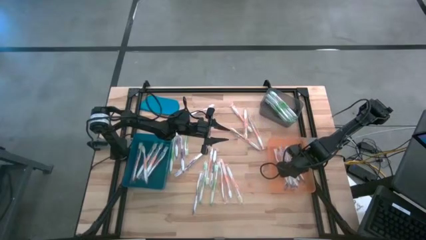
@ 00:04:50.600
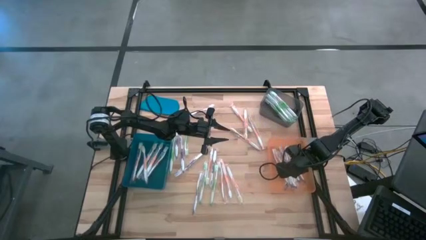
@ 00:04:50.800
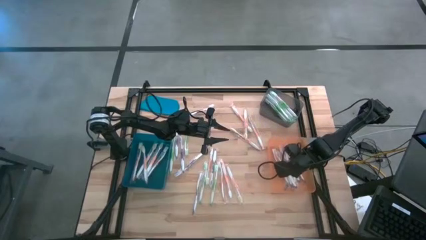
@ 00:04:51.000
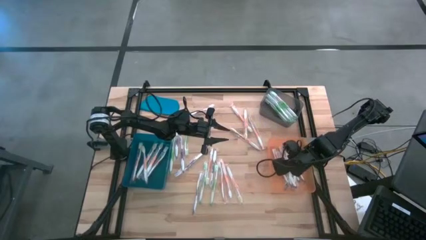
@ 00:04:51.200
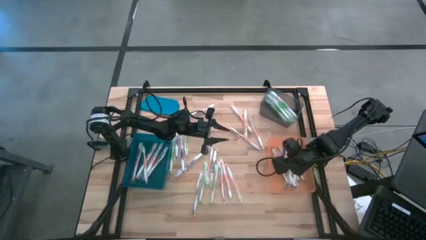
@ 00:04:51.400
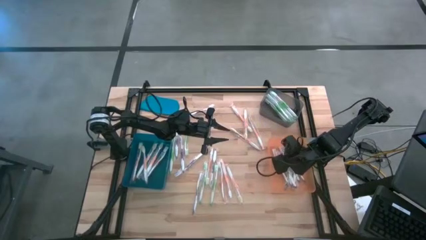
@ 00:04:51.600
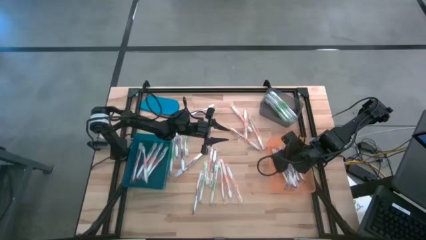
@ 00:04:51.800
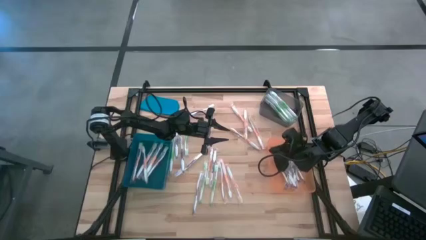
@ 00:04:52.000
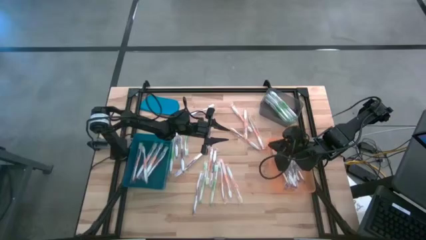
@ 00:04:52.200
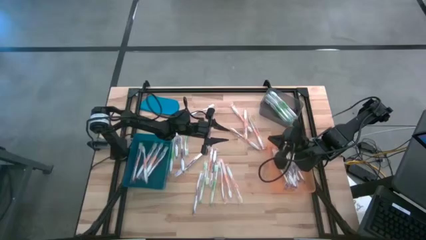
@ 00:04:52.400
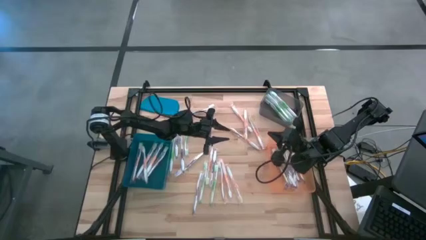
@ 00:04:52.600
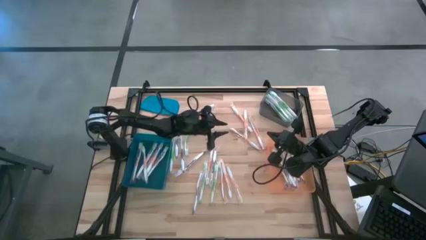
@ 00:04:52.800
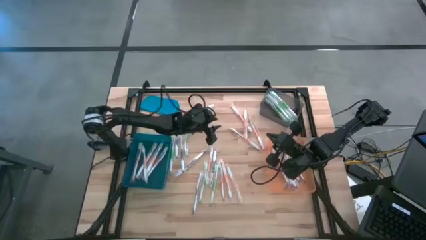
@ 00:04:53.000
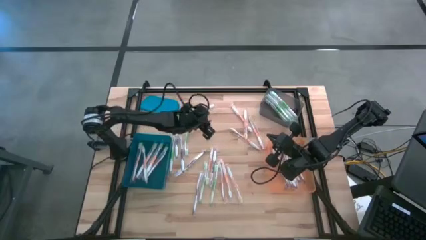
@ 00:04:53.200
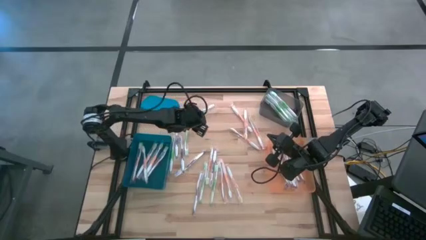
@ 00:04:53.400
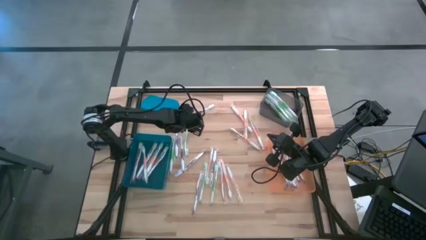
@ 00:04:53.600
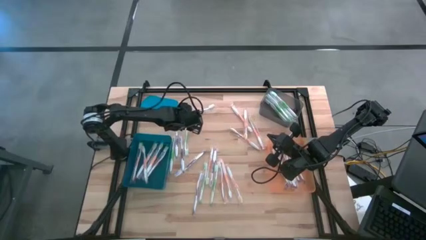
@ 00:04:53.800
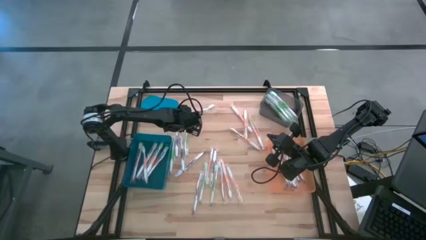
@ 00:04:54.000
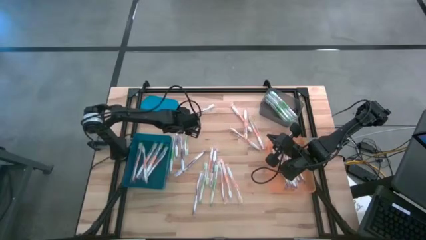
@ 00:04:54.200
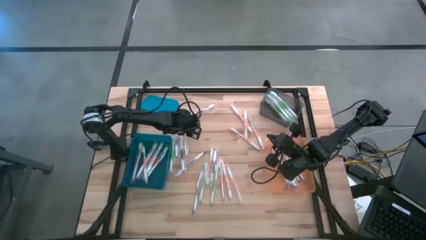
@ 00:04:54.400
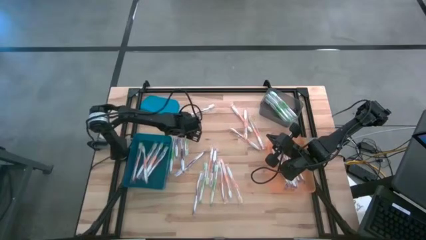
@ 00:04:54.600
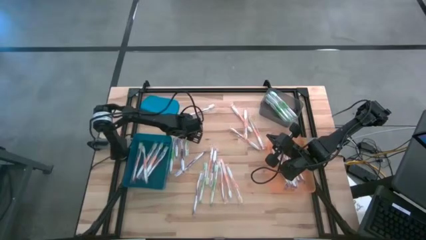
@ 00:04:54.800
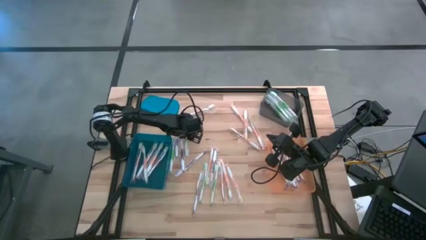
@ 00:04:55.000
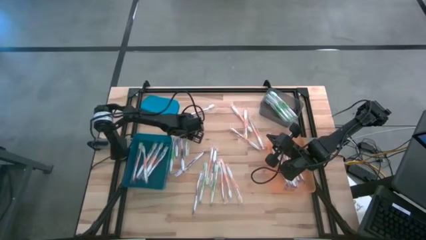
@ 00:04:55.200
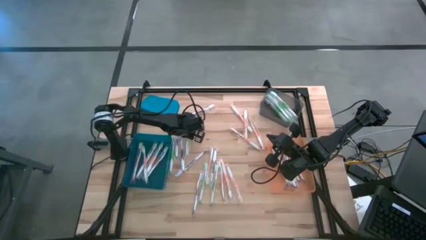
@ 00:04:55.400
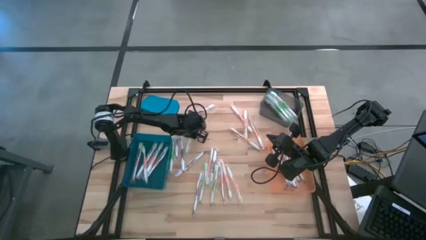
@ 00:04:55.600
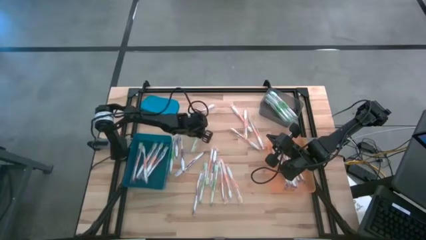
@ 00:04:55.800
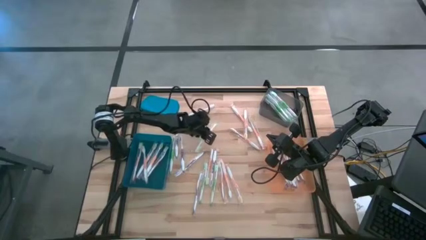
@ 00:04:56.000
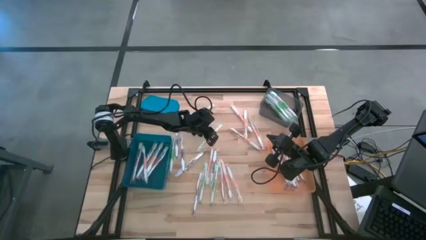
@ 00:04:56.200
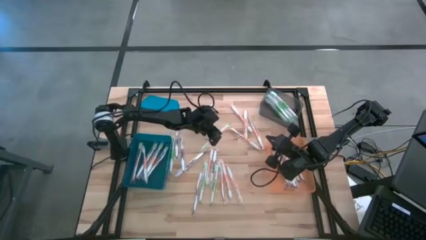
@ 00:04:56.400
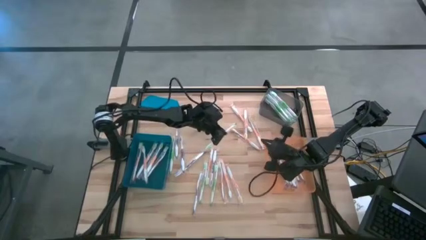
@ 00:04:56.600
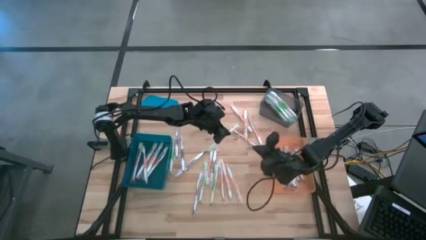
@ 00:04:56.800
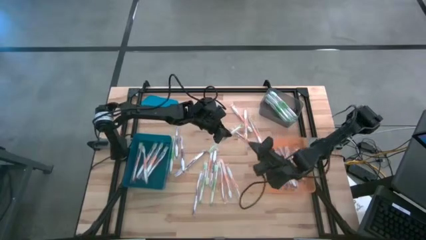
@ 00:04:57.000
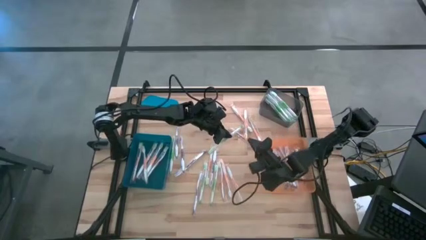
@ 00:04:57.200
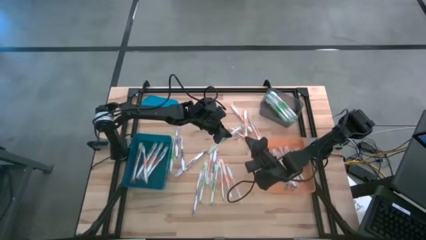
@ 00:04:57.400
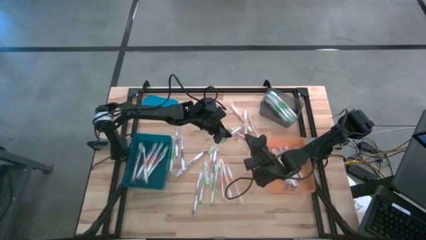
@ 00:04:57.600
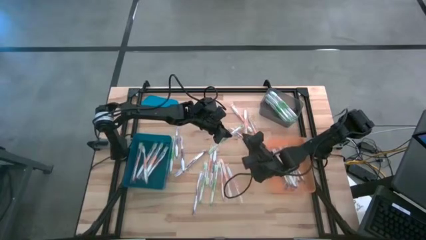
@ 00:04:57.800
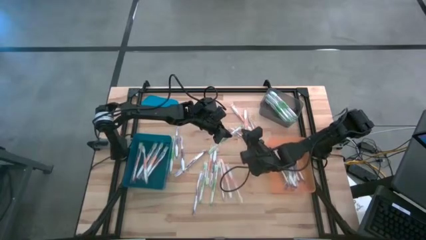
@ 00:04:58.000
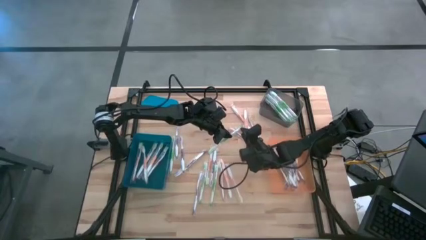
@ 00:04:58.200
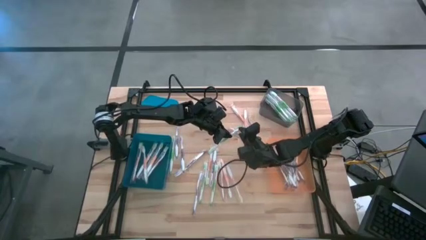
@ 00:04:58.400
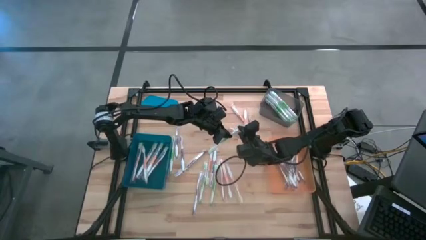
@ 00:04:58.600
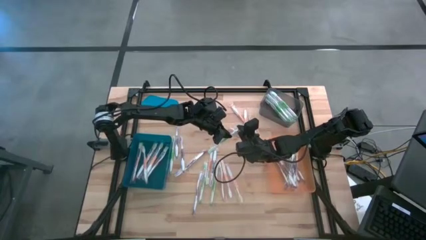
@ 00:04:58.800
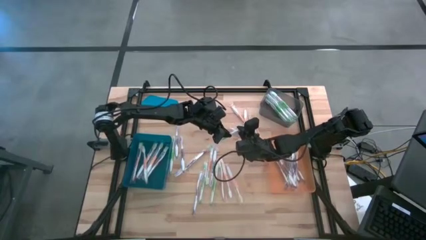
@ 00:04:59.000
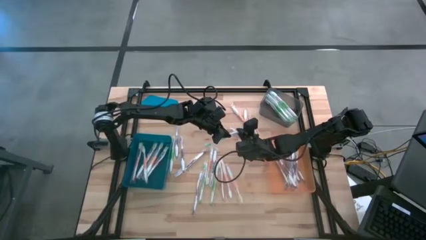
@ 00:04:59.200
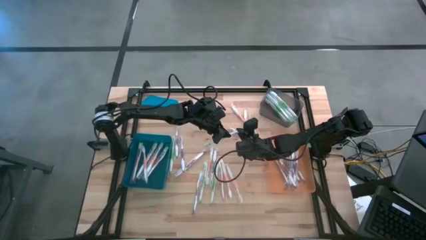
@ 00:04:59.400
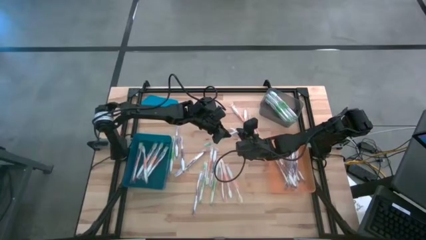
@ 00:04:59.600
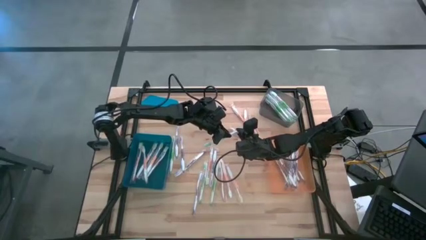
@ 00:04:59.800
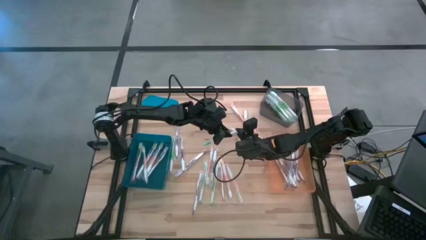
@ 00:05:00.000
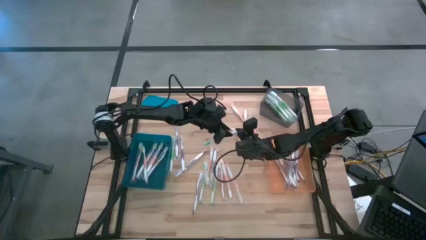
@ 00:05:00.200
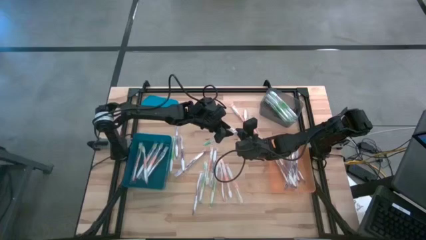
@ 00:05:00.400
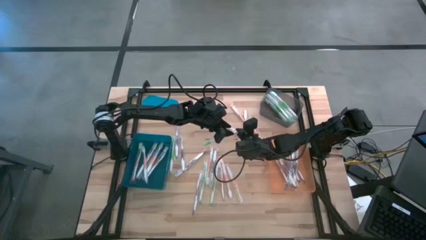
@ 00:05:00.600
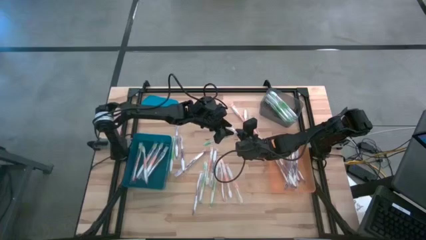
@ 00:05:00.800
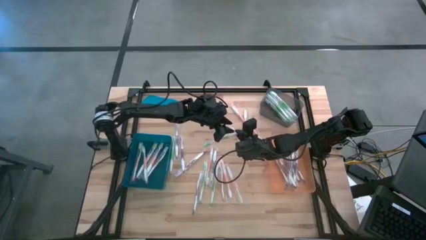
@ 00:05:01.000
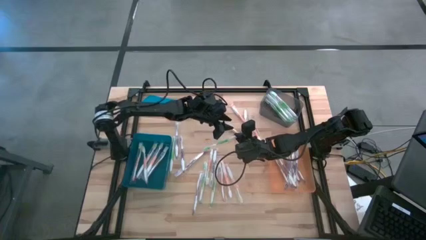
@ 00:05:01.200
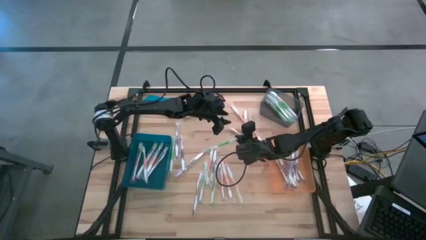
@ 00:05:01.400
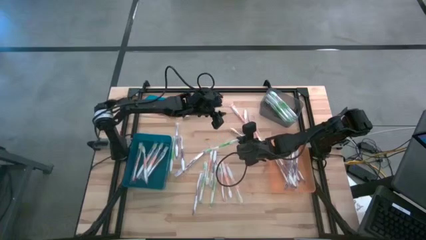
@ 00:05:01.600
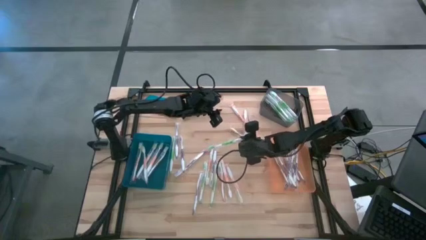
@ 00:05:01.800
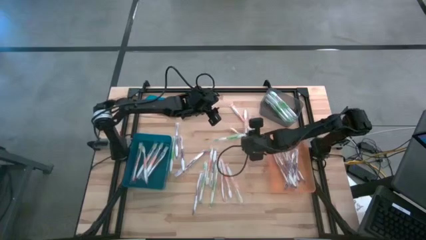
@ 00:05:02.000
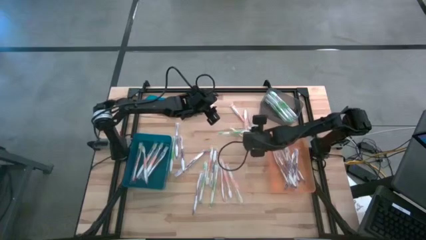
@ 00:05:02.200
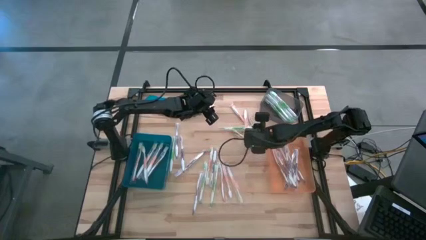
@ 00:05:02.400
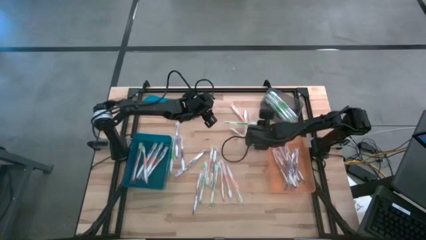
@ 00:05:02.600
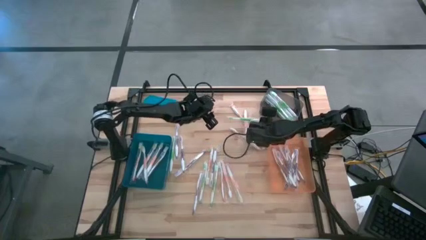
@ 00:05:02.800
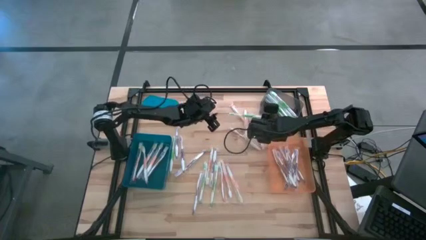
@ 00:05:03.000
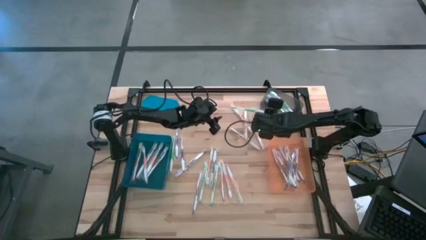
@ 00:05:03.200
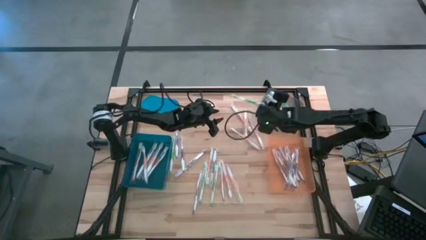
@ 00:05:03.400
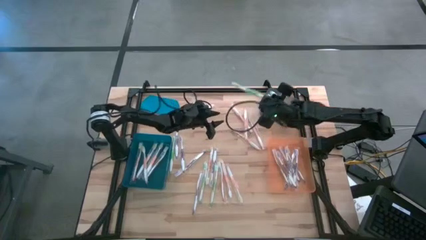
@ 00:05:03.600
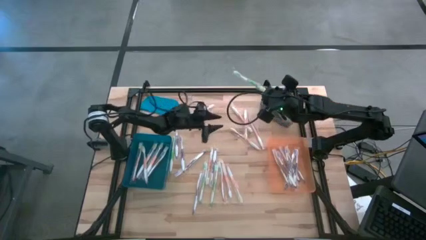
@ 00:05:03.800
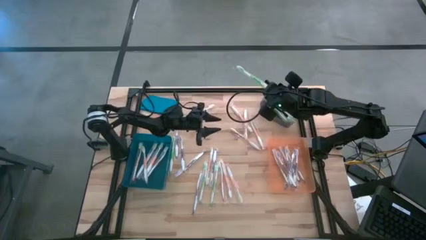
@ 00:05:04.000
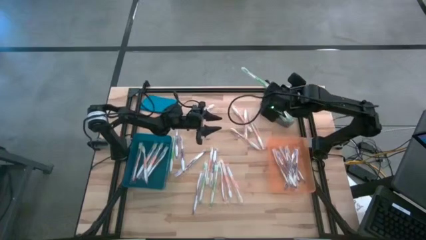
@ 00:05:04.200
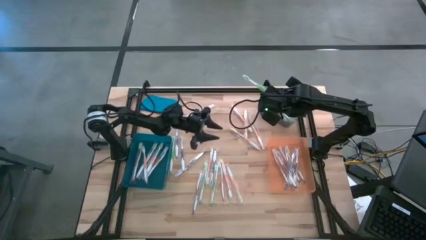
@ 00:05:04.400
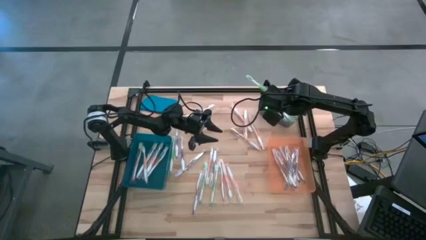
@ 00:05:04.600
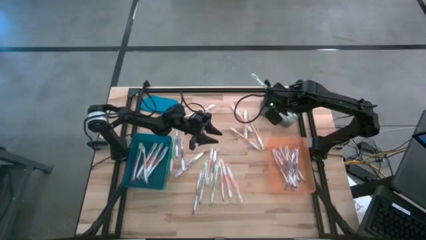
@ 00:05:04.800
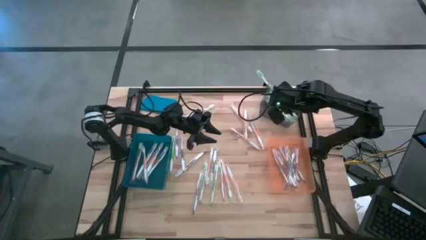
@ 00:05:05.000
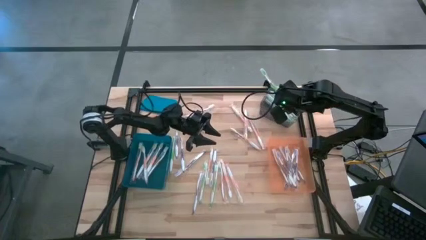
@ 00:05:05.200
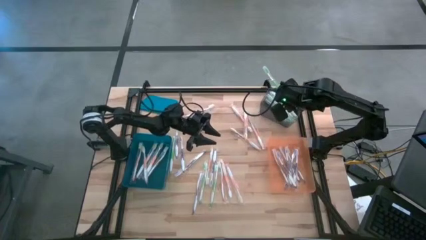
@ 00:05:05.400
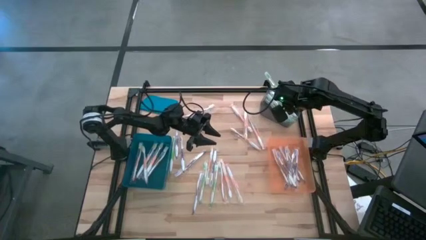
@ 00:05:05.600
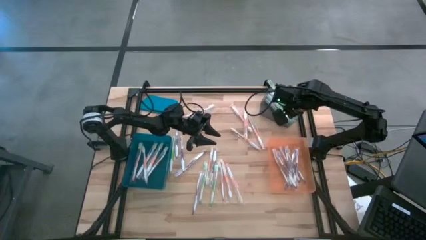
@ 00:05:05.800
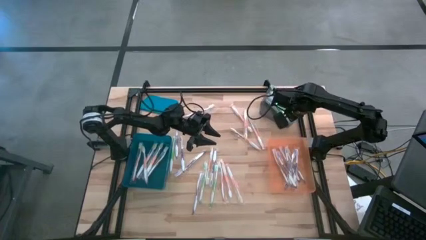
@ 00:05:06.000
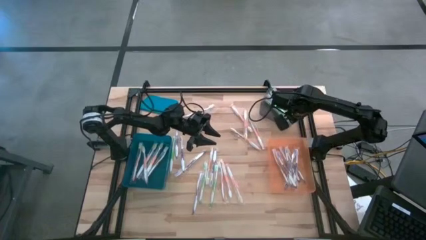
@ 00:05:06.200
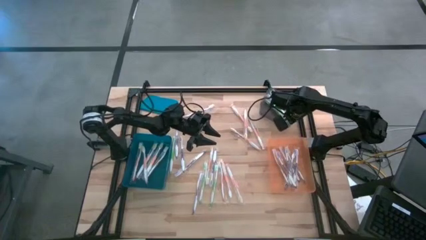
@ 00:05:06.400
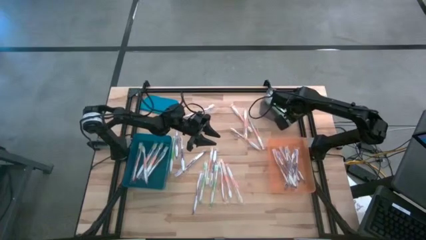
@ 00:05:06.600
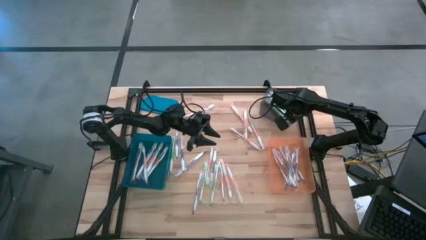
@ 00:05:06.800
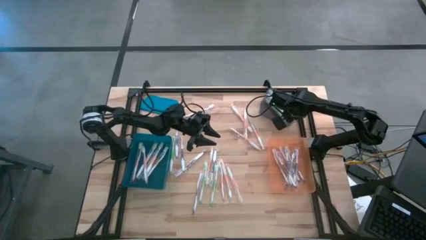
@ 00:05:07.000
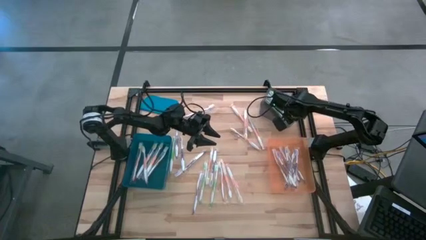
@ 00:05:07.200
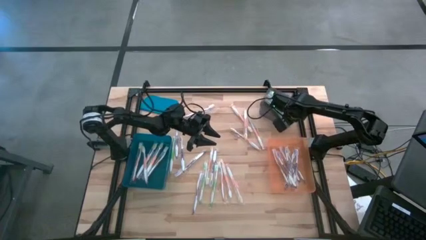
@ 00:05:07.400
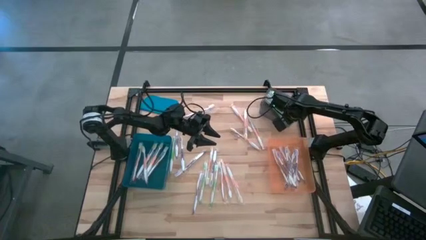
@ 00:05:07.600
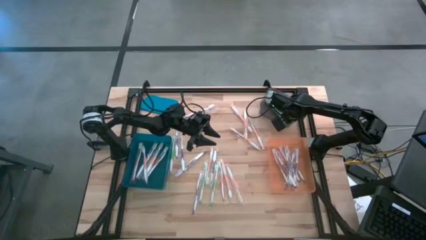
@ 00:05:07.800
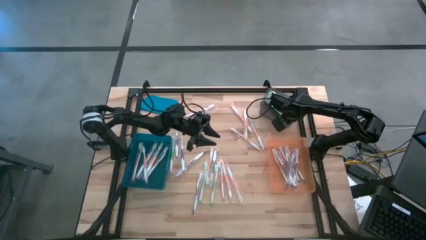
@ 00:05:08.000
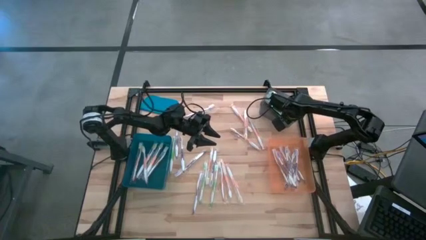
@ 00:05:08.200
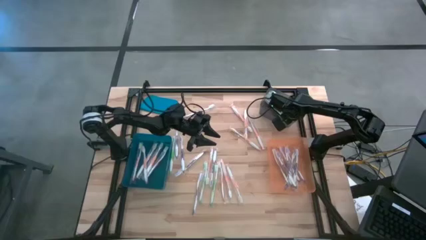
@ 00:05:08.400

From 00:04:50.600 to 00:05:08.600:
Task: Pick & Place Toothbrushes
Put the green toothbrush into the black bin
